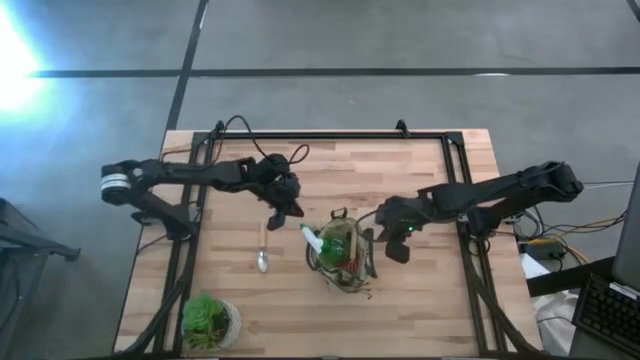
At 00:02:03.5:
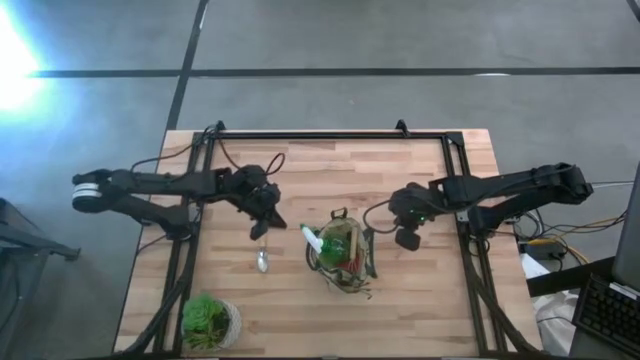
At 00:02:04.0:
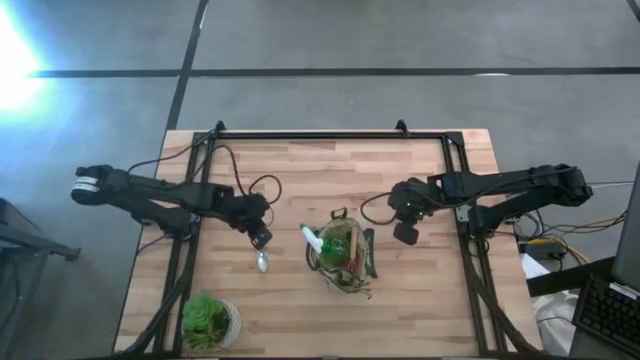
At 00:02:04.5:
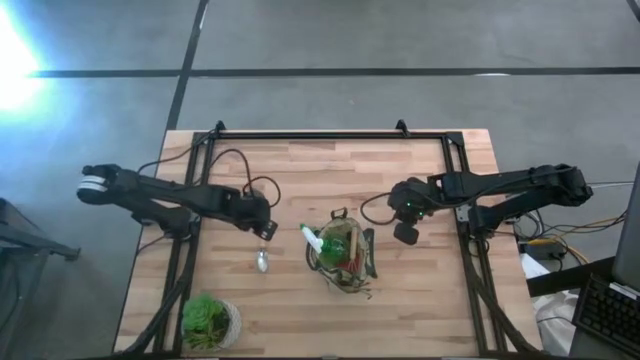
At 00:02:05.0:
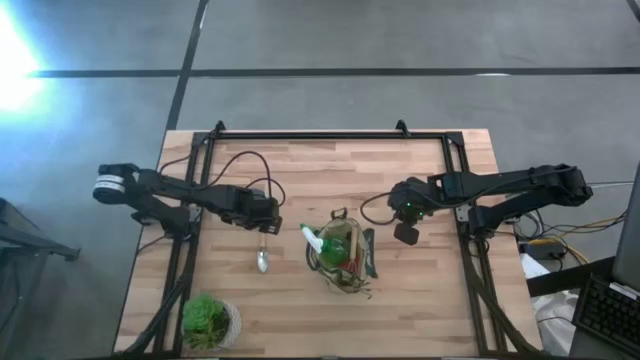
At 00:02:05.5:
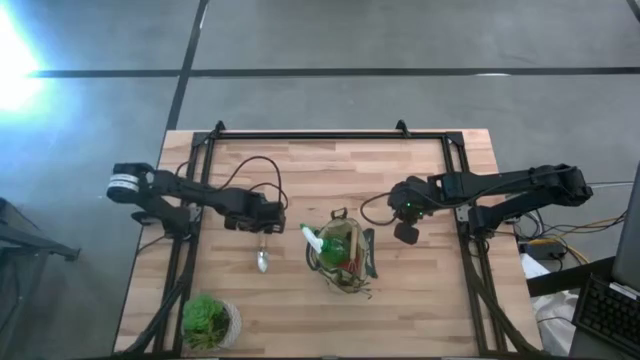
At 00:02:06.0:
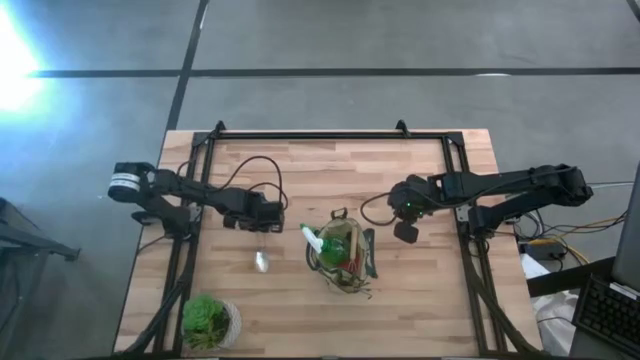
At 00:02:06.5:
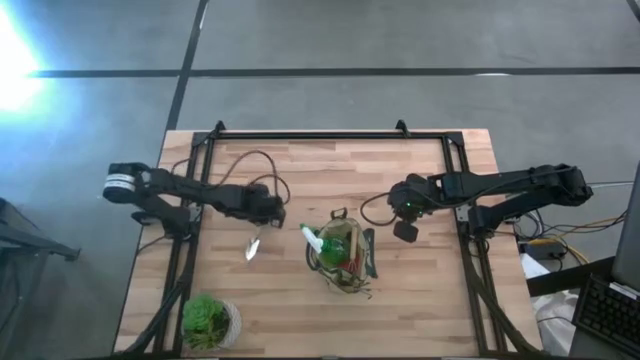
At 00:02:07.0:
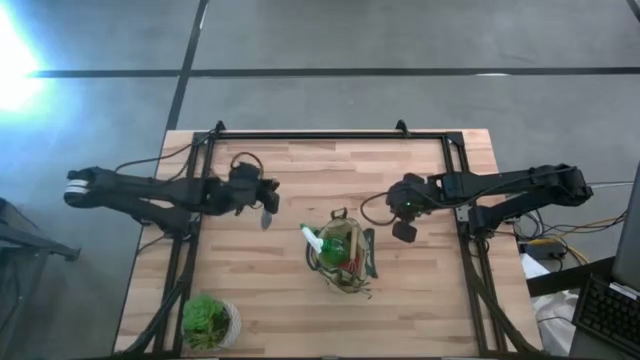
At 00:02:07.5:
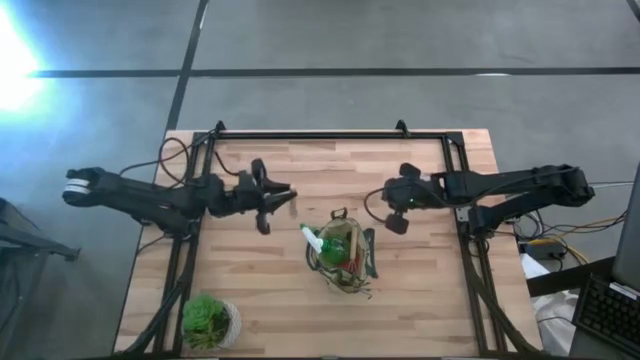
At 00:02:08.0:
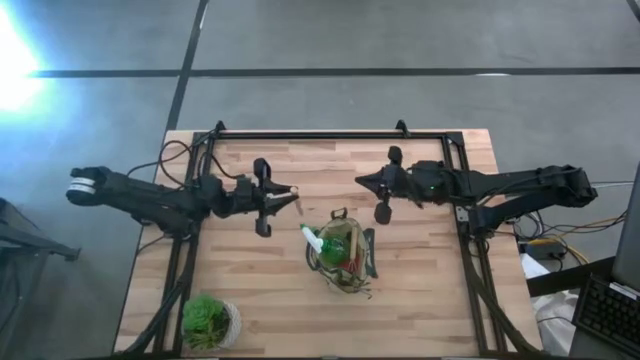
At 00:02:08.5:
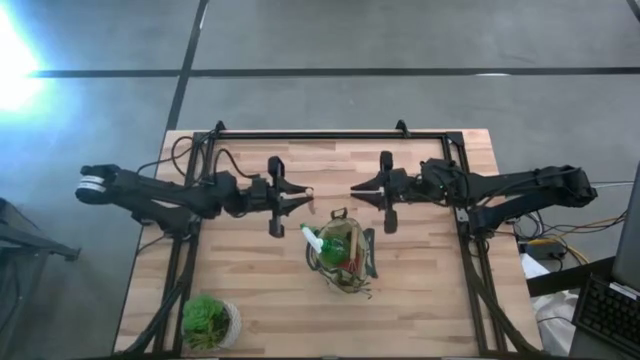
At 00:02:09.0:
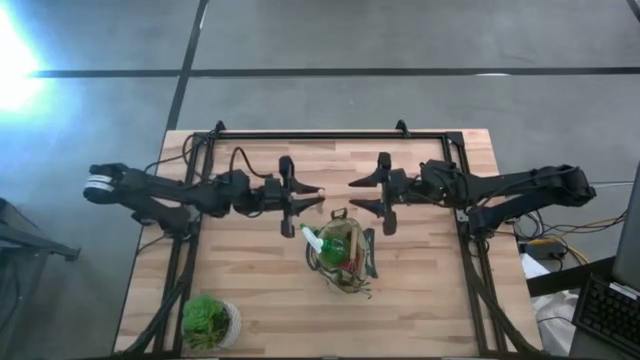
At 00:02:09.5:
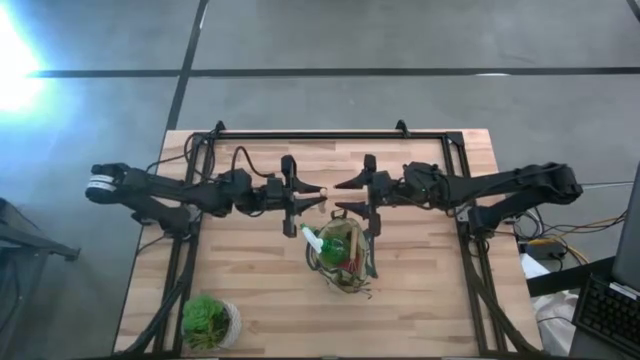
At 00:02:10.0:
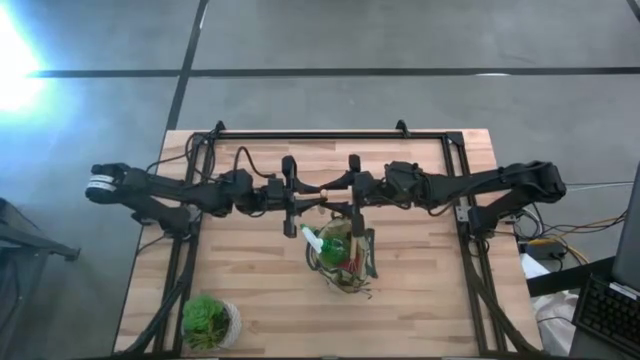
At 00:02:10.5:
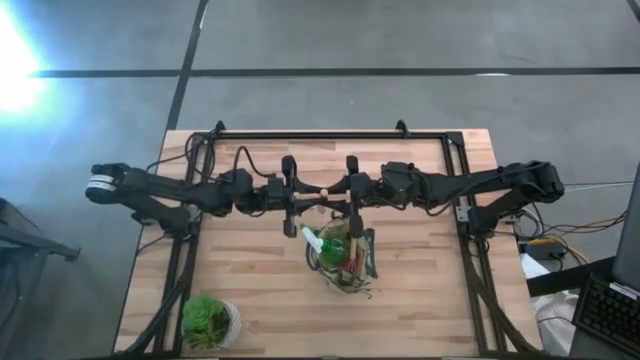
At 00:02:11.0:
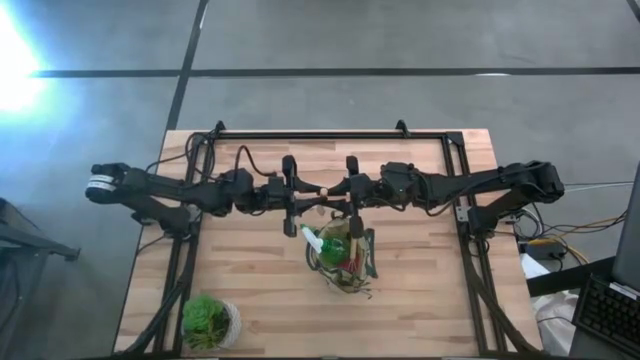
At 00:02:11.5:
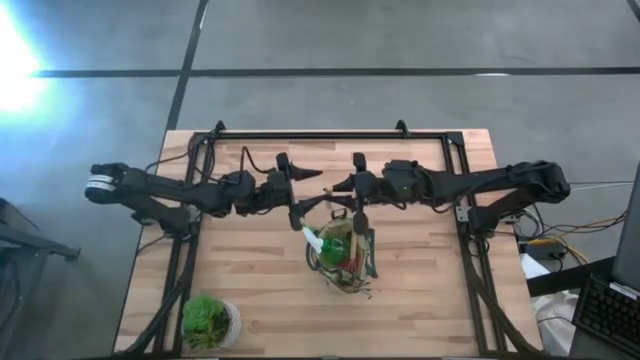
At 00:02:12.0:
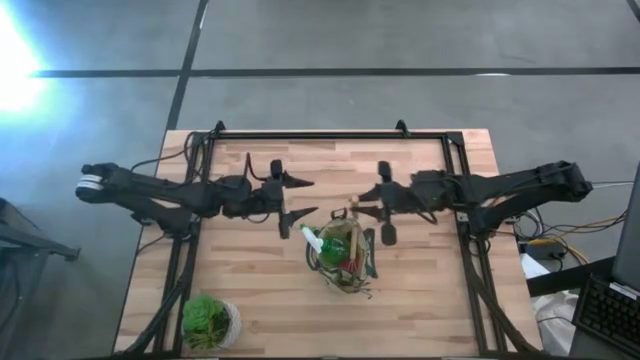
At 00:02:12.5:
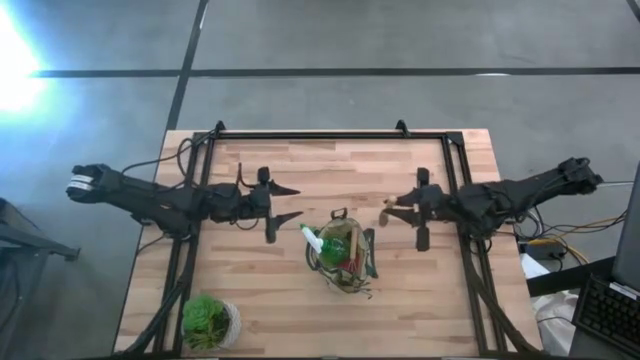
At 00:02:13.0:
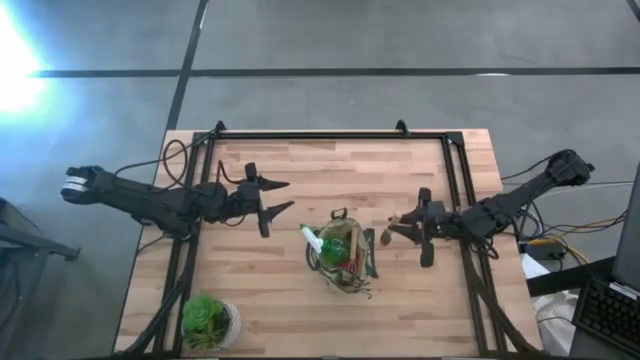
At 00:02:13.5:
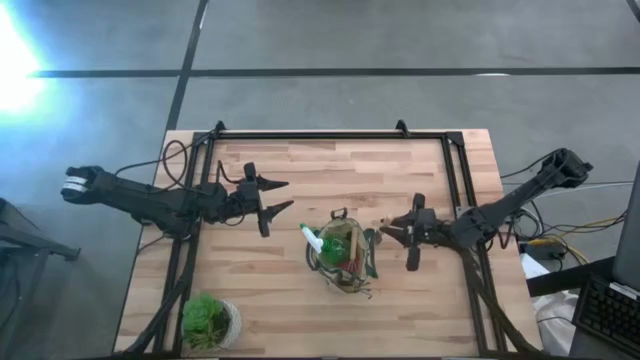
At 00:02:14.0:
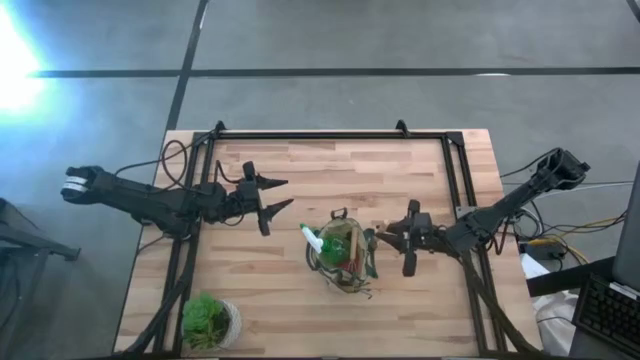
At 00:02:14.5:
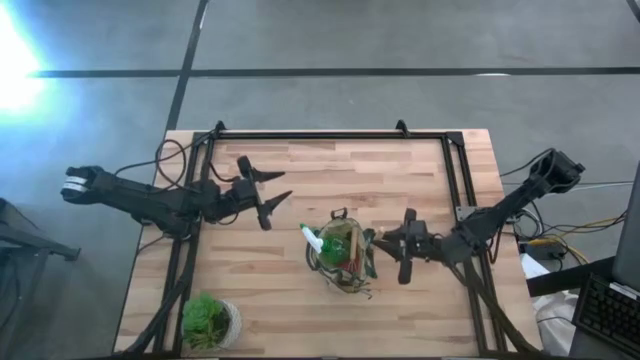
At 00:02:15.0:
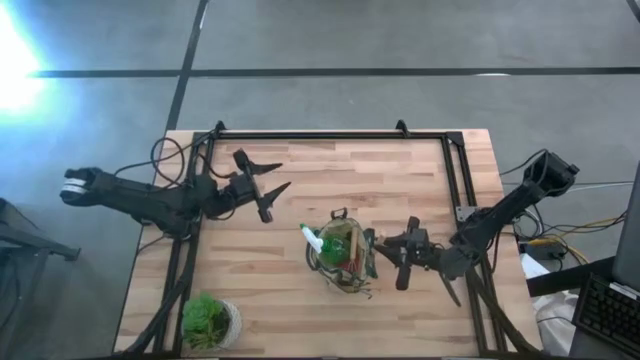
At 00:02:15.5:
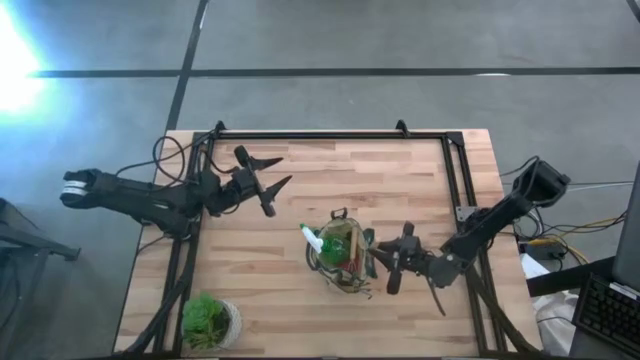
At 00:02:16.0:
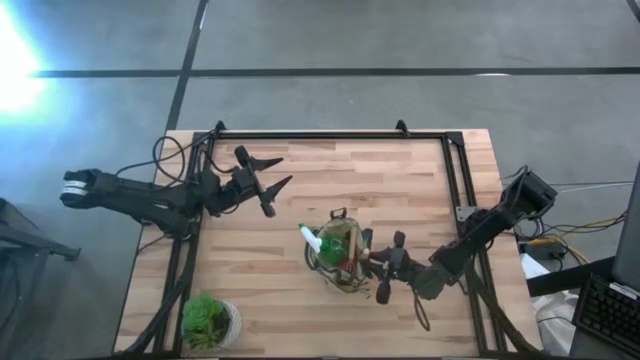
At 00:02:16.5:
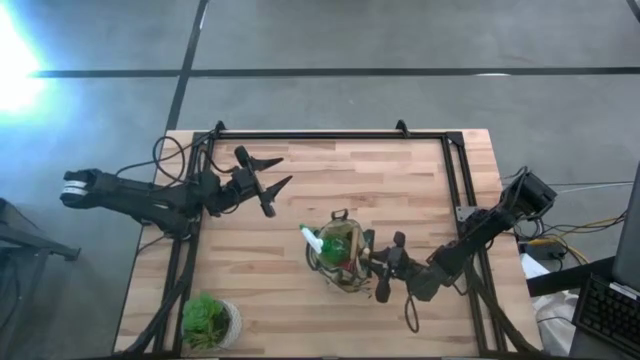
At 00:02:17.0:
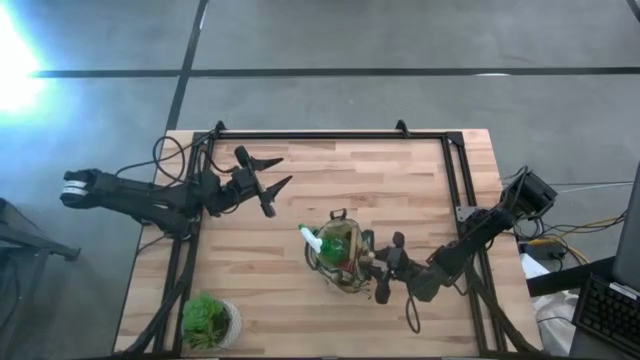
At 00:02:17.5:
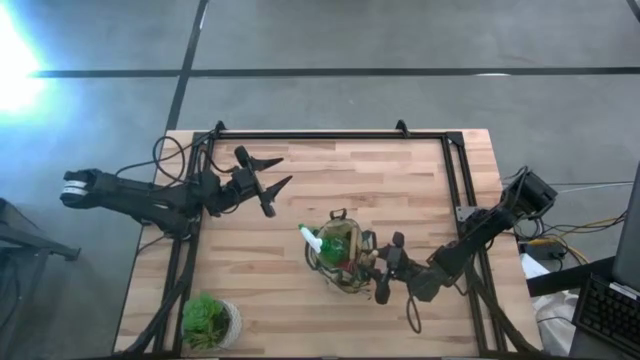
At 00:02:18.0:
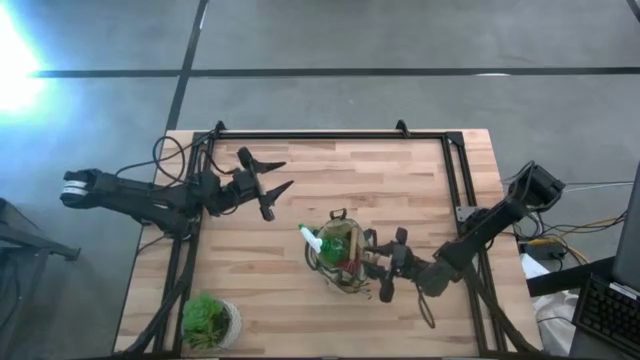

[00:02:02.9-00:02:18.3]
Task: Pick & Place Garden tools in Gardening bag
Put the trowel into the side pocket of the gardening bag

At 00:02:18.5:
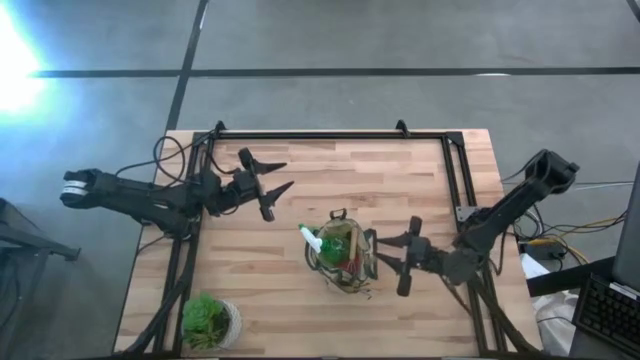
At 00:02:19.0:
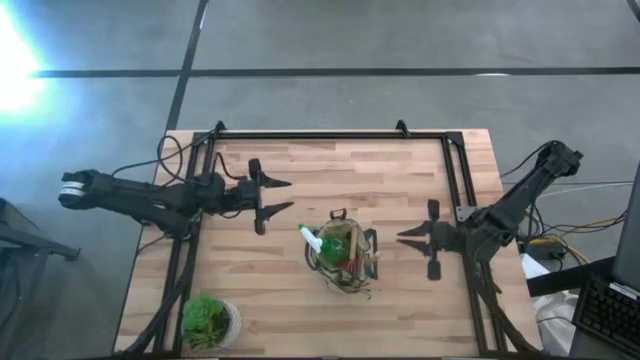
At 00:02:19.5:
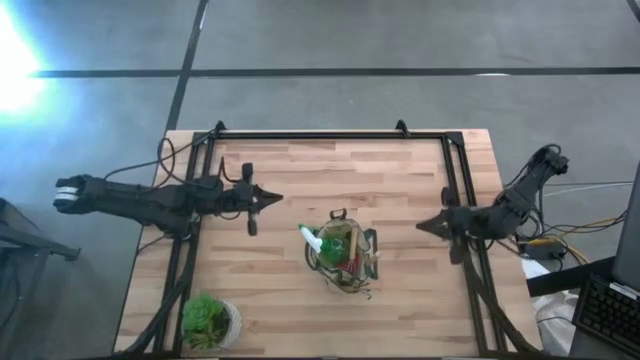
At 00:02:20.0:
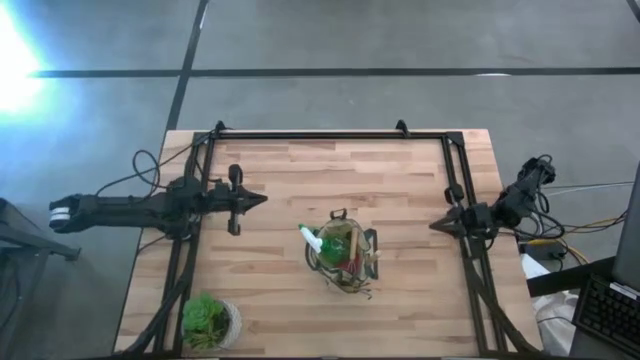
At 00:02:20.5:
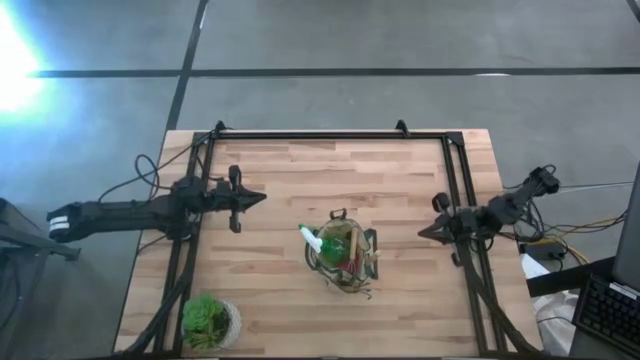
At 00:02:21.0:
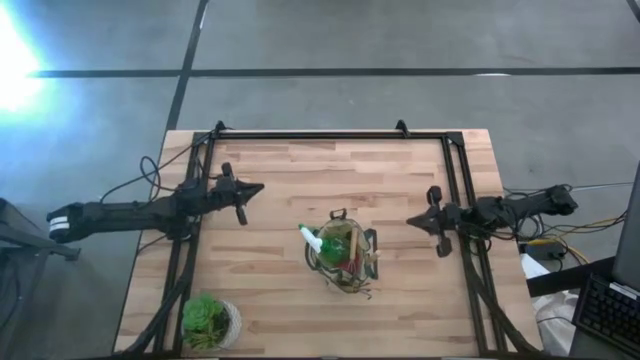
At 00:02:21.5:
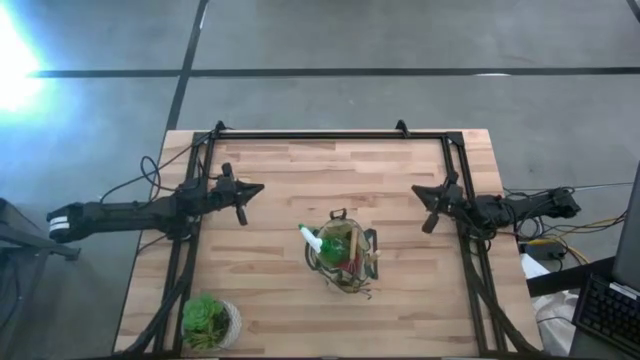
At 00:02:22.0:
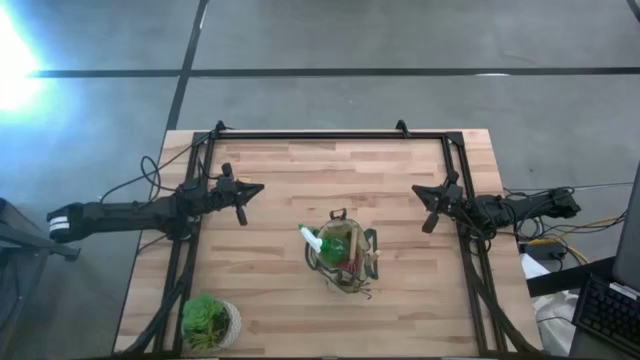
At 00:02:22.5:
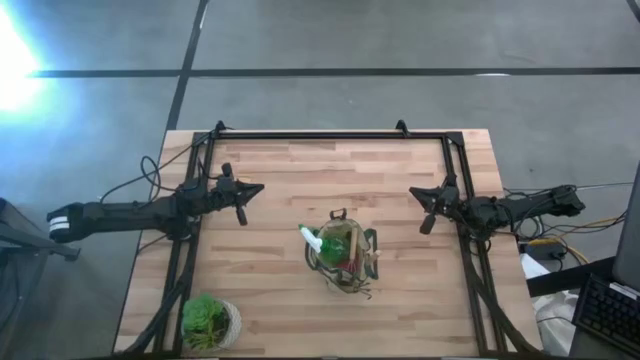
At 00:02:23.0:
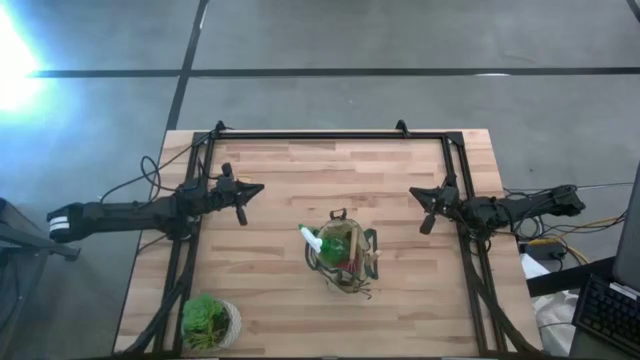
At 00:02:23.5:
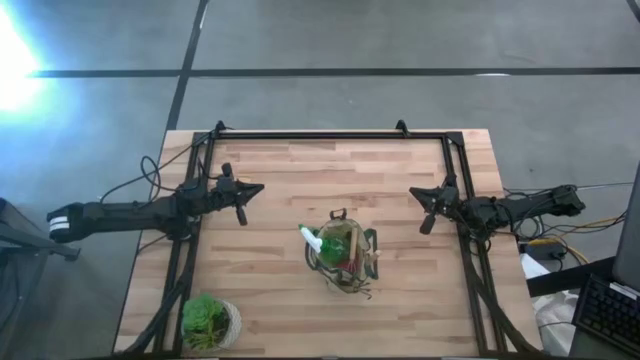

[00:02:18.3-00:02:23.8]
Return to Home Position
